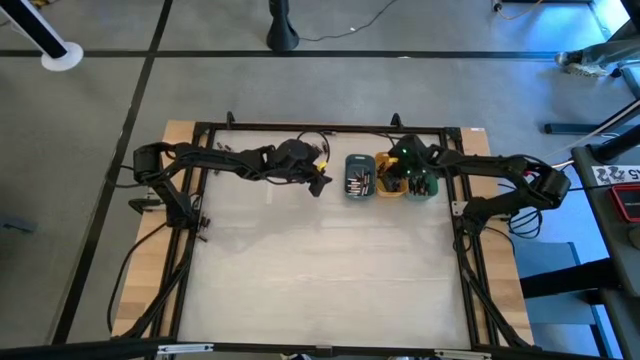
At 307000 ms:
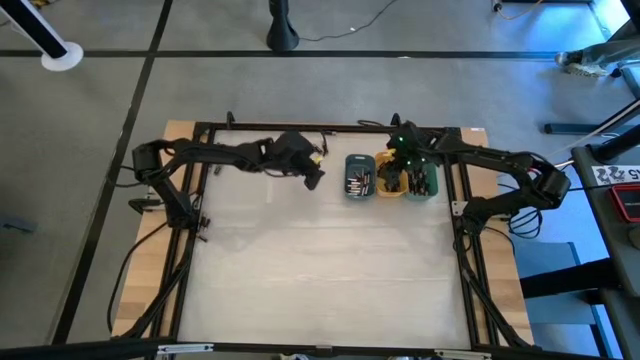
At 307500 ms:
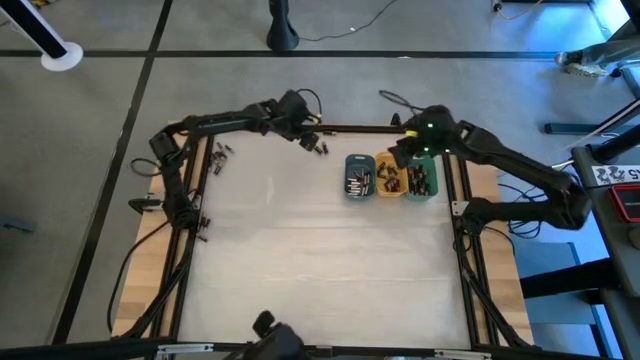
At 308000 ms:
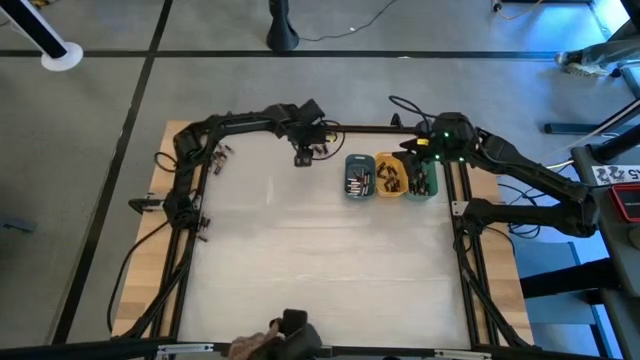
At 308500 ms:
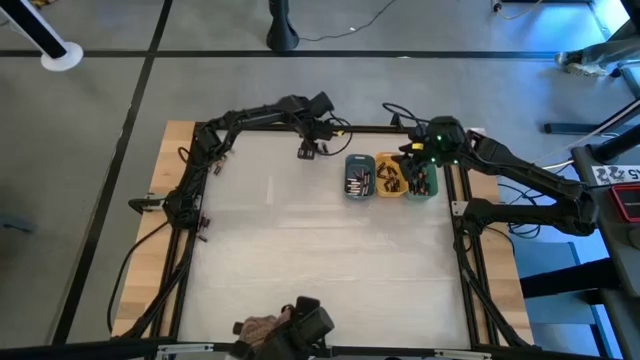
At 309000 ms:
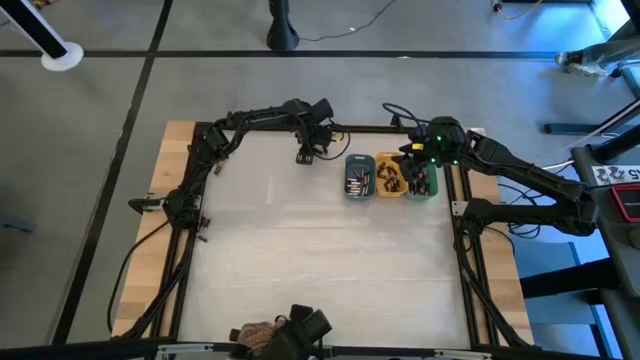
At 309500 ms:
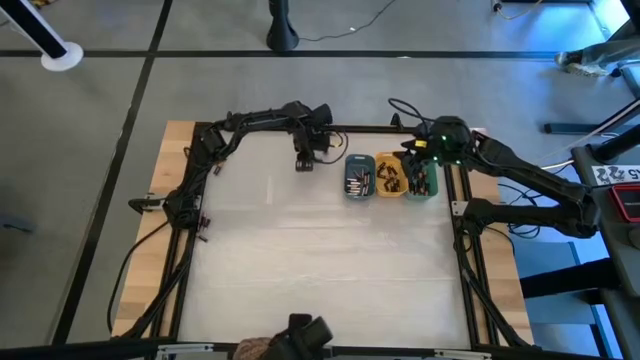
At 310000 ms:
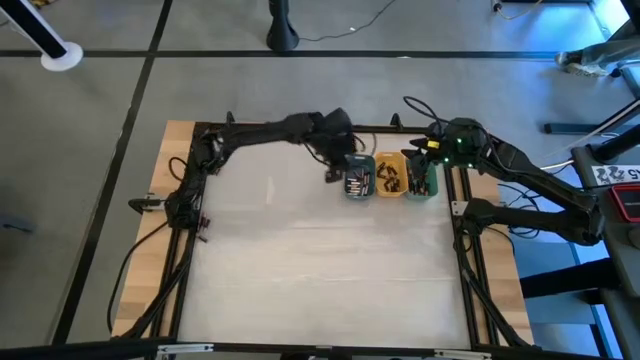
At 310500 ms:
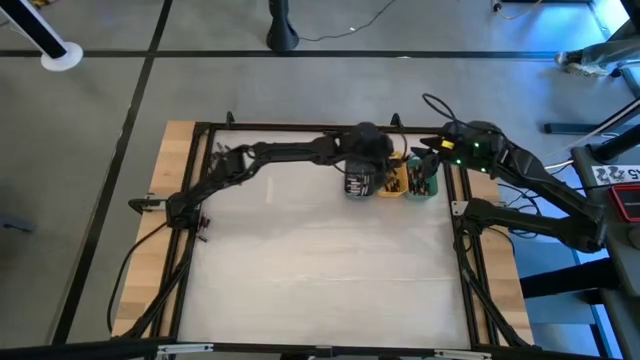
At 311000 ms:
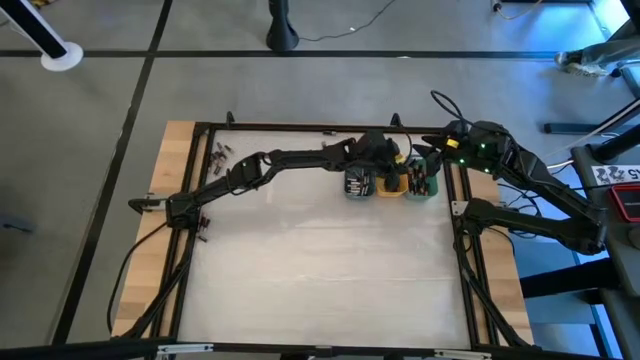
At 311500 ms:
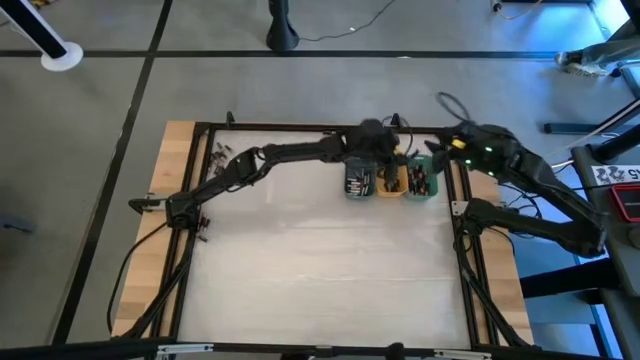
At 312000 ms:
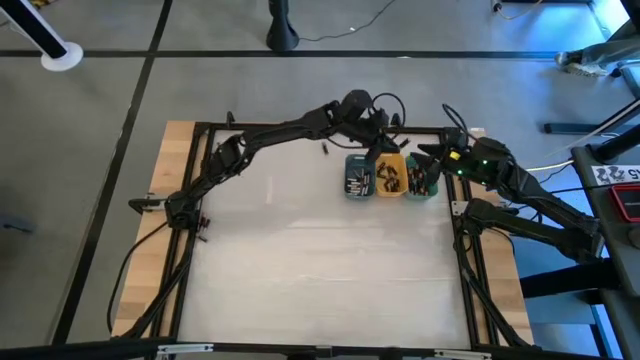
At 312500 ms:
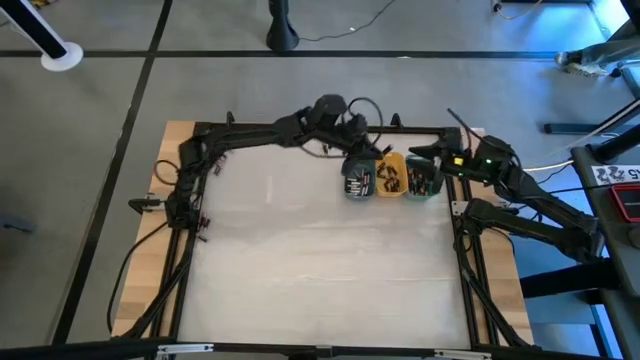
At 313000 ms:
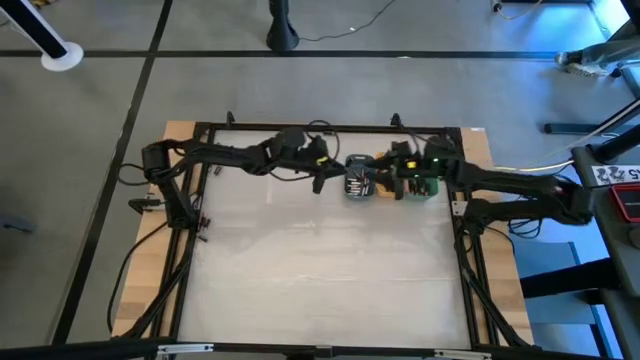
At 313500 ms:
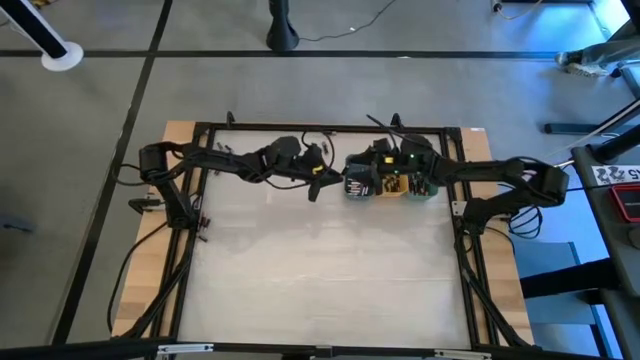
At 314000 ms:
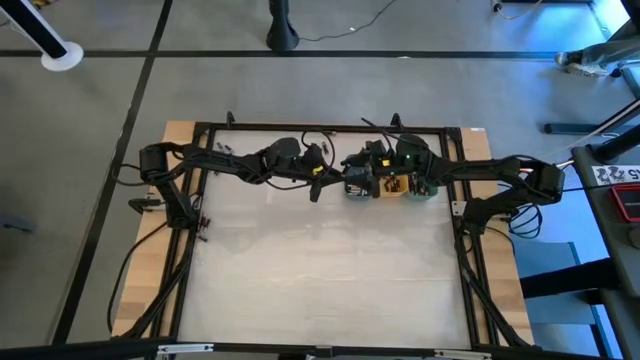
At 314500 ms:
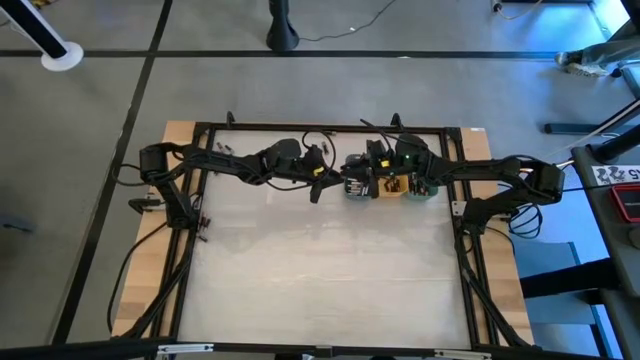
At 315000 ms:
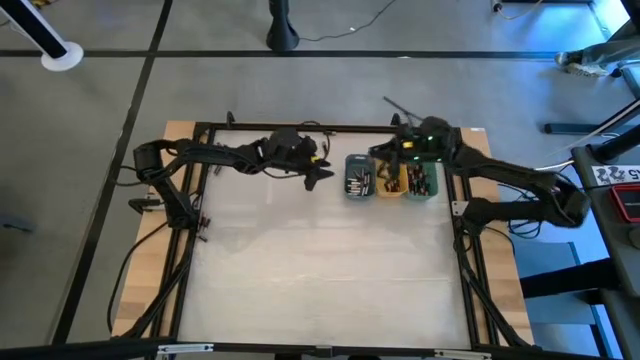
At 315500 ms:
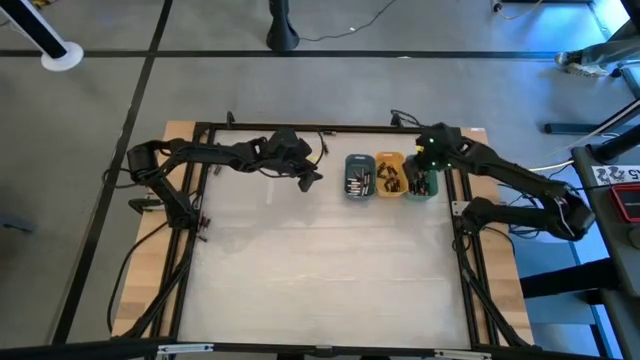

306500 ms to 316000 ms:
Task: Sort batteries
Put the black battery into the green bin

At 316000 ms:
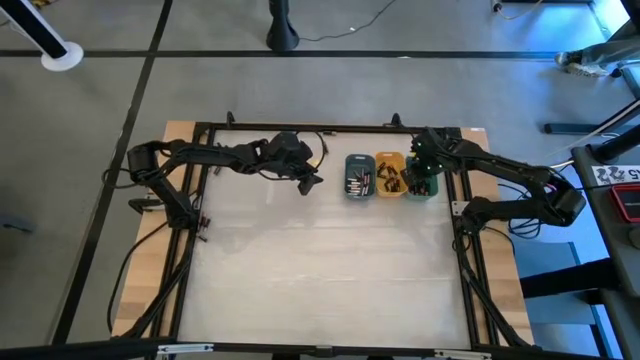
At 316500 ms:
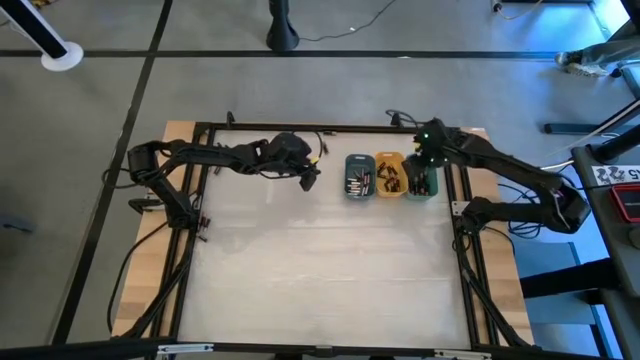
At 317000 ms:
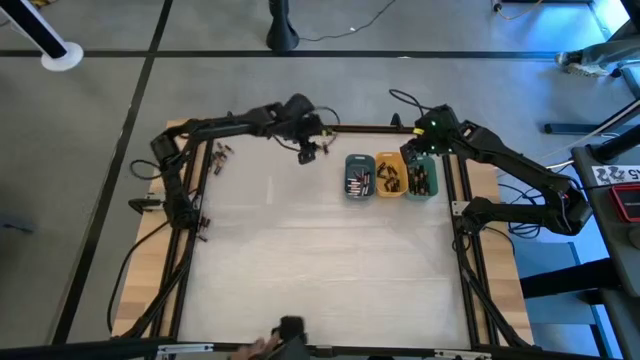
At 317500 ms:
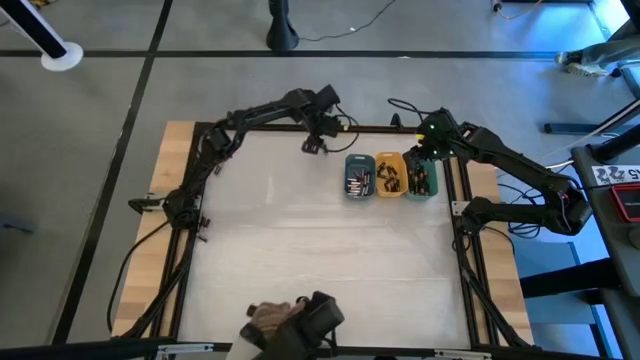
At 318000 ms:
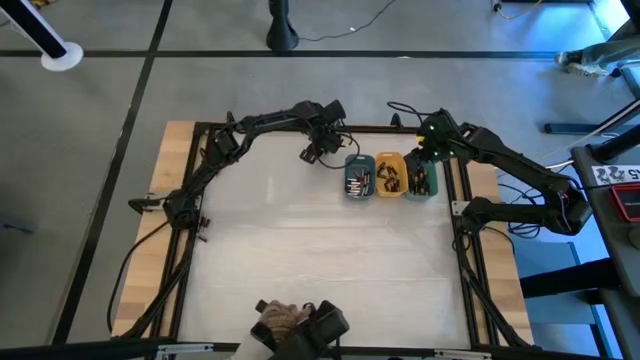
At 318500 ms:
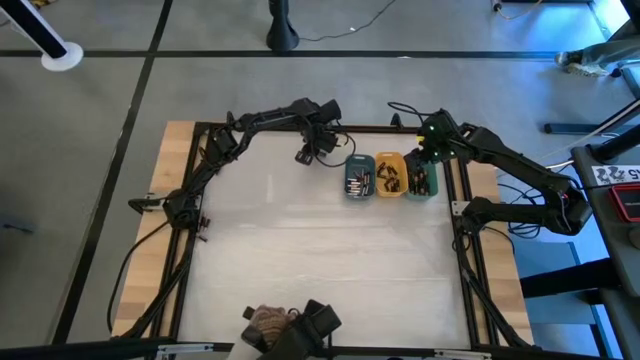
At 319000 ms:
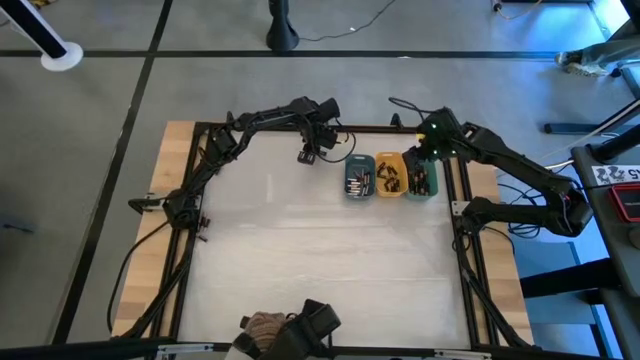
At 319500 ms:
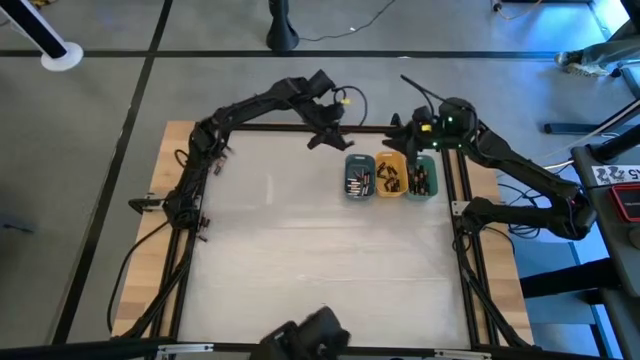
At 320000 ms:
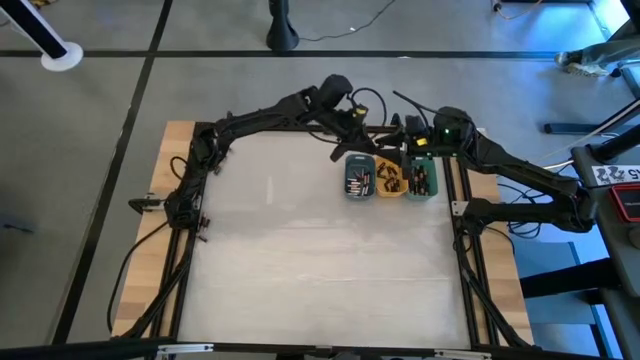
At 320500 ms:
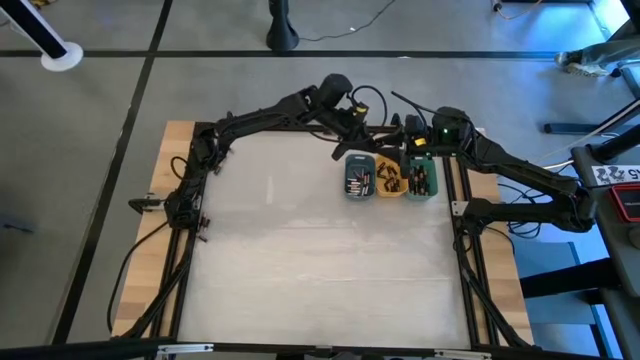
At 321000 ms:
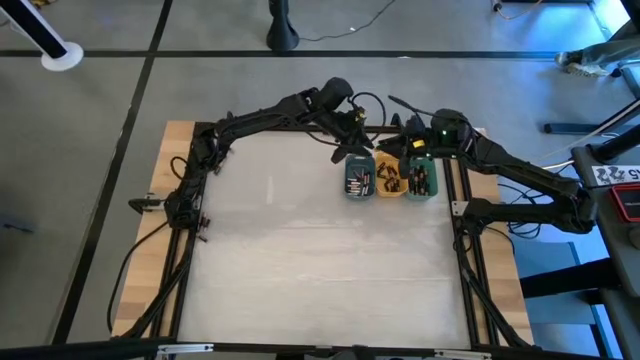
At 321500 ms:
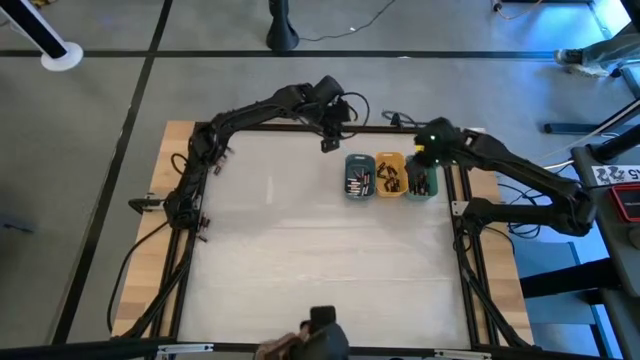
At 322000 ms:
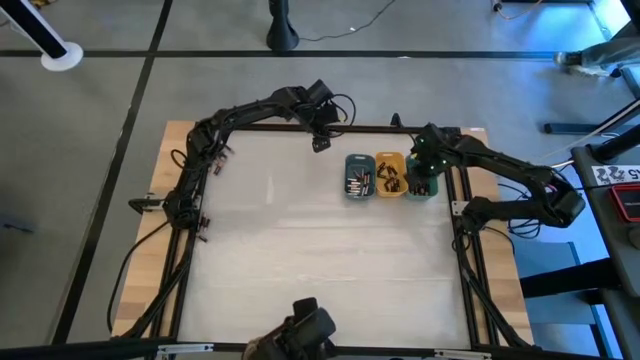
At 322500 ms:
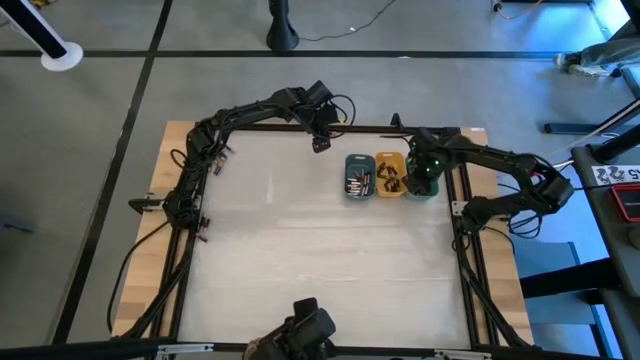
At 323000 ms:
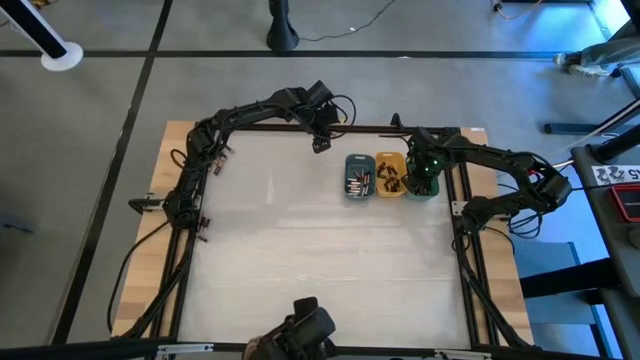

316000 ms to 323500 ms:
Put the black battery into the green bin

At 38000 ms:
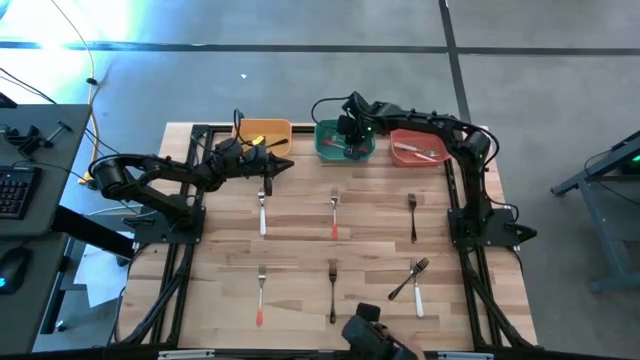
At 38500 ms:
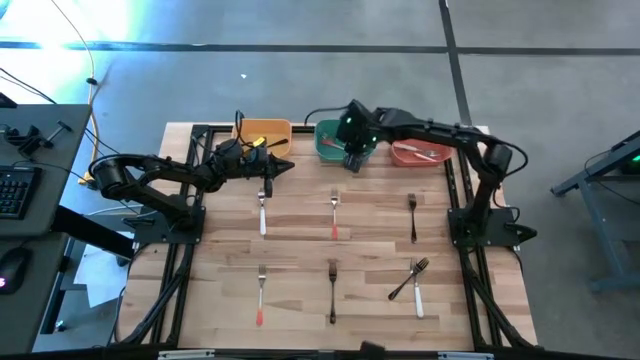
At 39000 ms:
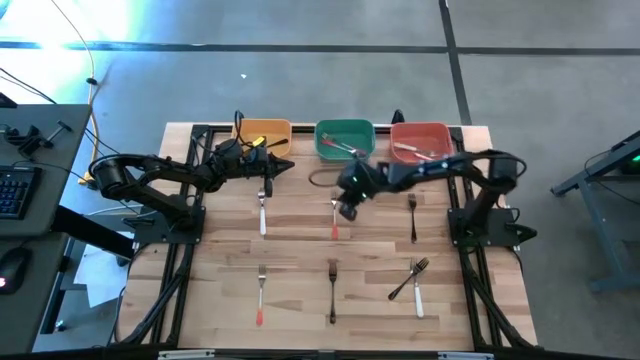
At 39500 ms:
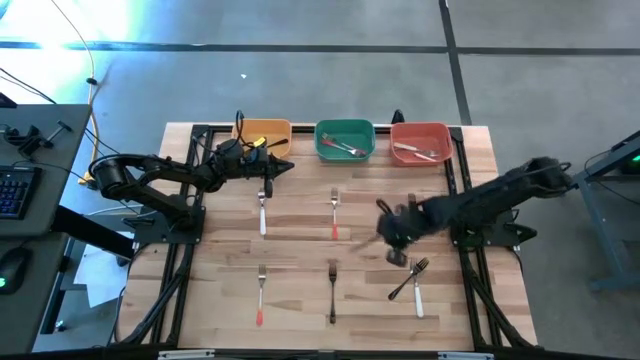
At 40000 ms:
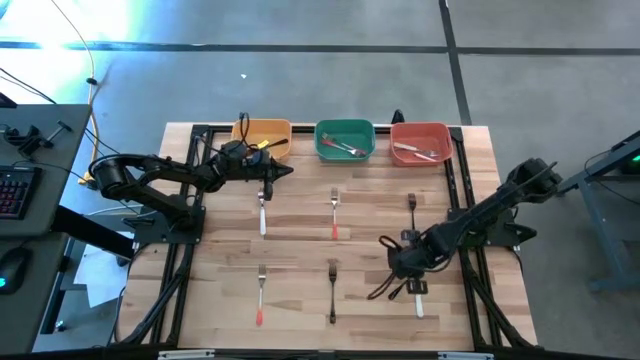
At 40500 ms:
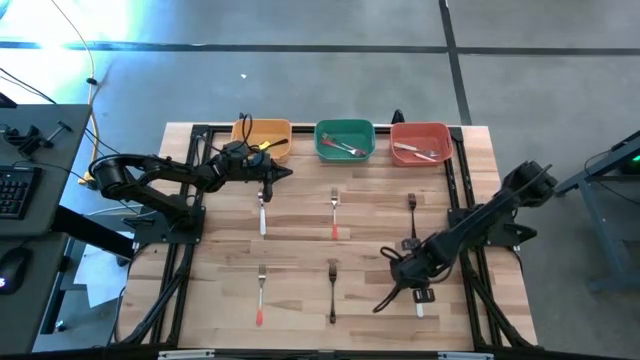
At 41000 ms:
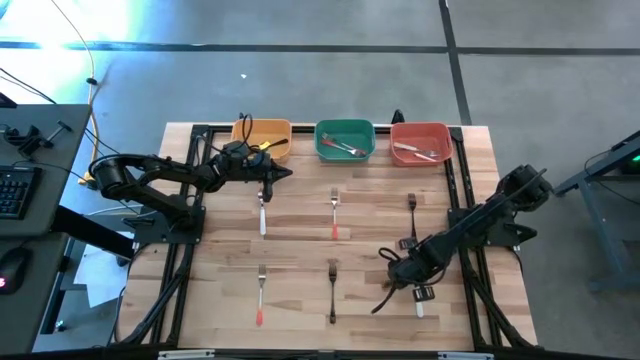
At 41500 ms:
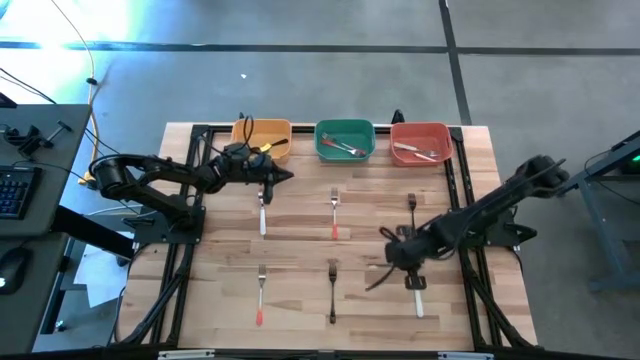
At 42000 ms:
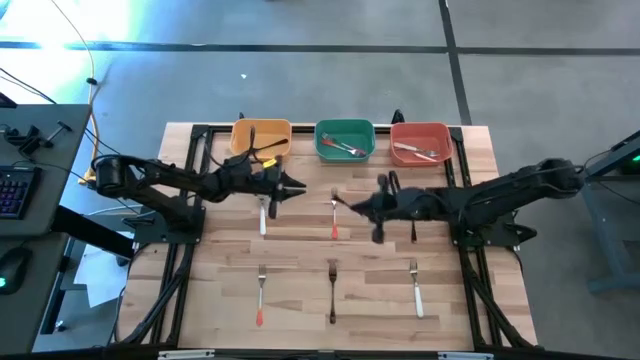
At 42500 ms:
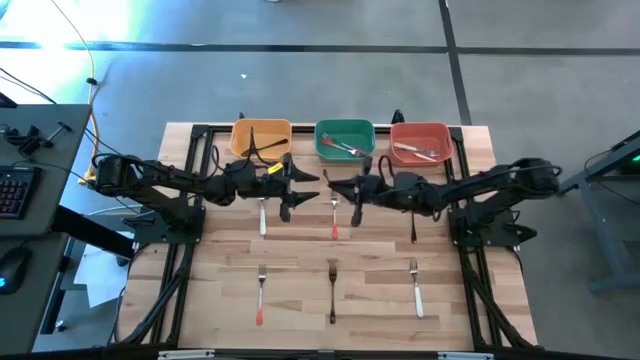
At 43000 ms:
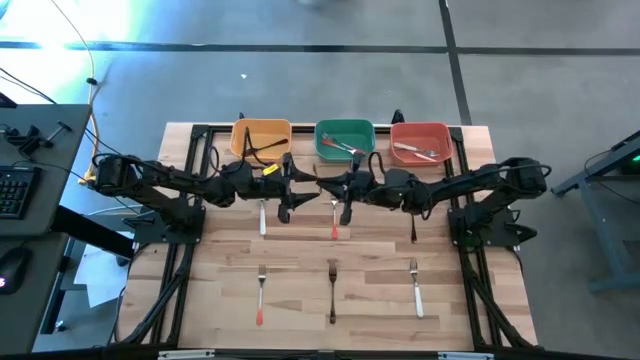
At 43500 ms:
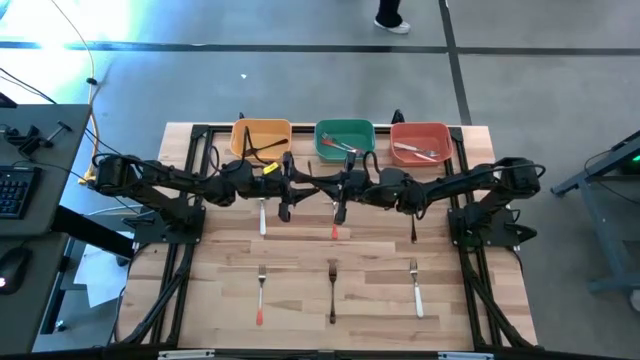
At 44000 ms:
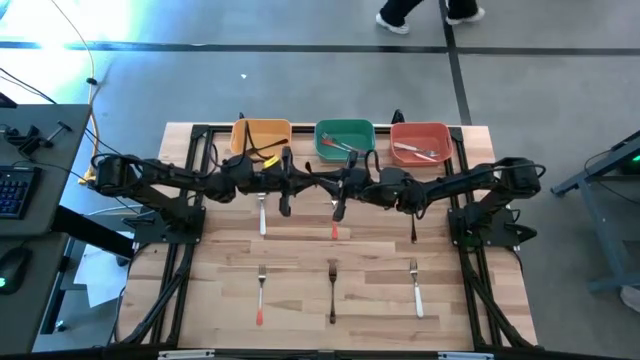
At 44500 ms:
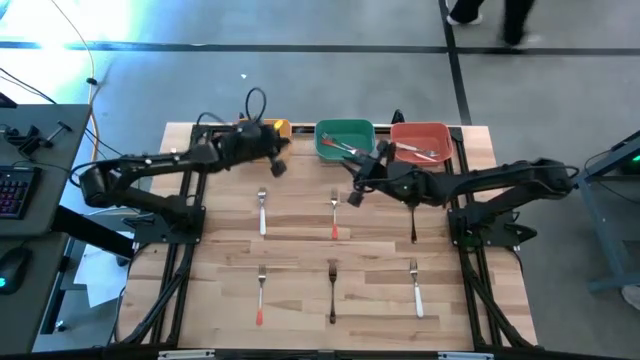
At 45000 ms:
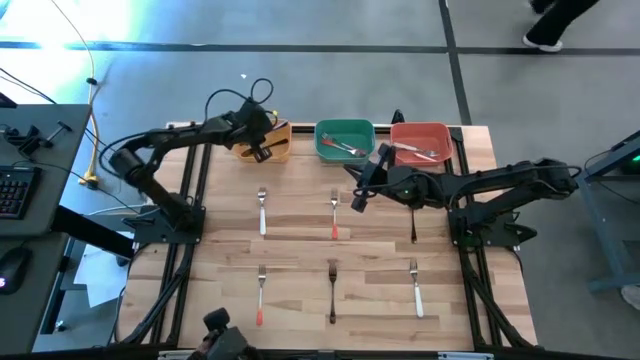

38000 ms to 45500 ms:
Task: Sort silverware by color (type)
Put the bottom right black fork into the yellow bin
